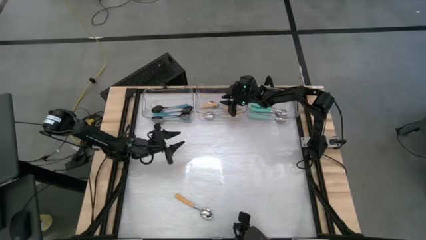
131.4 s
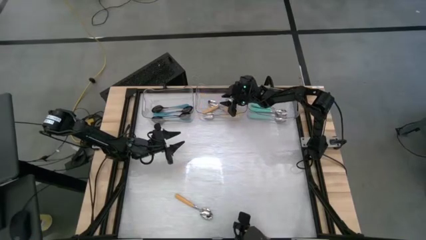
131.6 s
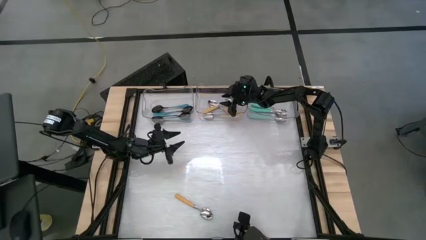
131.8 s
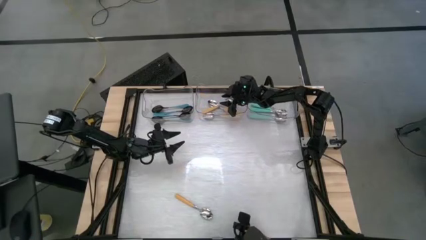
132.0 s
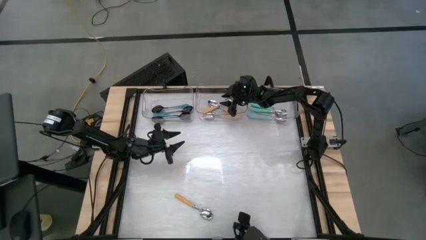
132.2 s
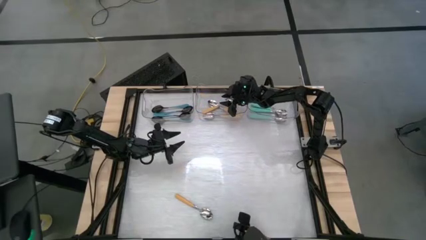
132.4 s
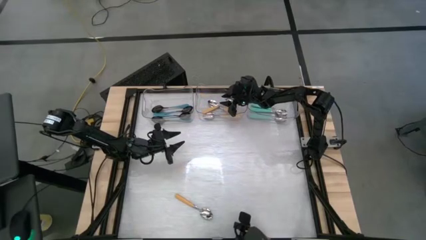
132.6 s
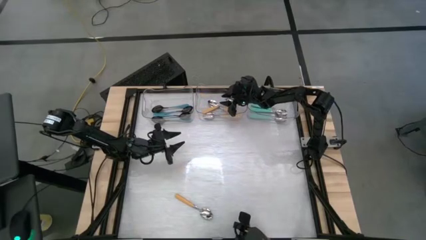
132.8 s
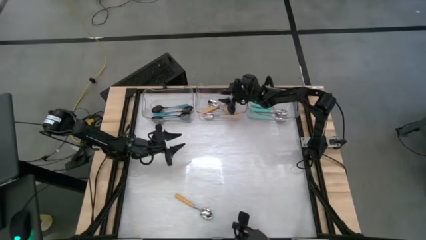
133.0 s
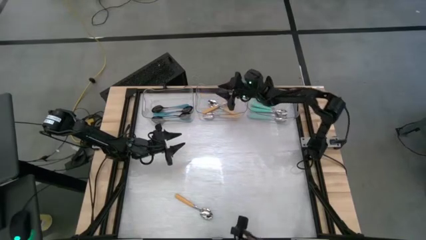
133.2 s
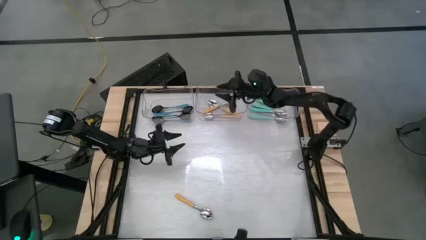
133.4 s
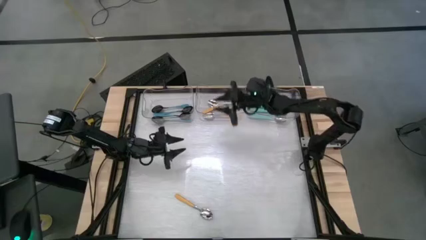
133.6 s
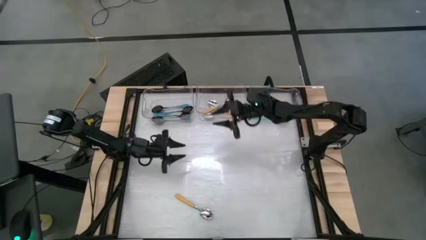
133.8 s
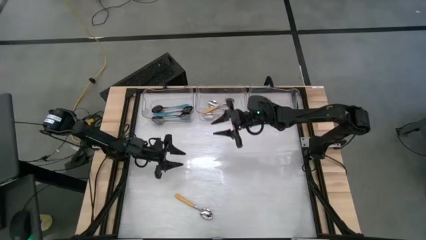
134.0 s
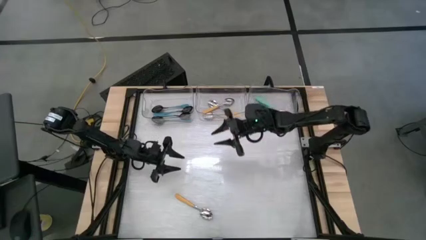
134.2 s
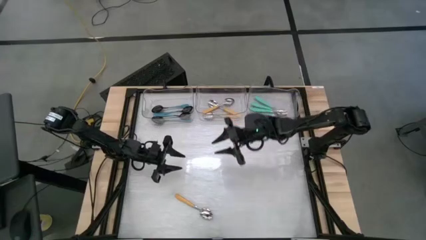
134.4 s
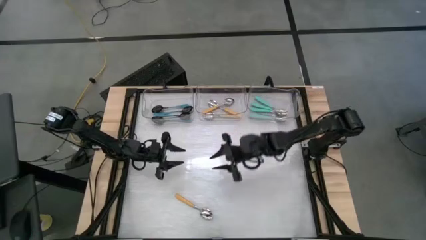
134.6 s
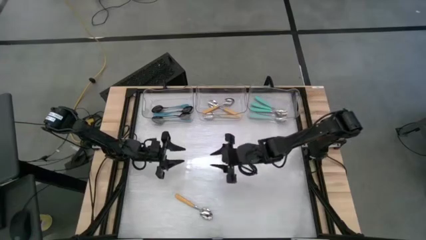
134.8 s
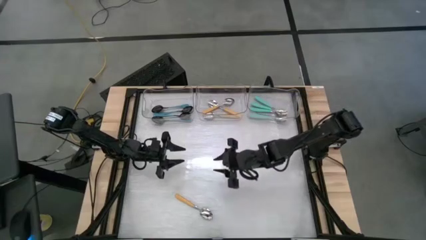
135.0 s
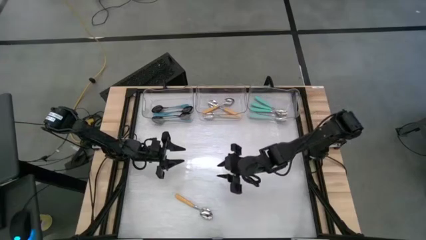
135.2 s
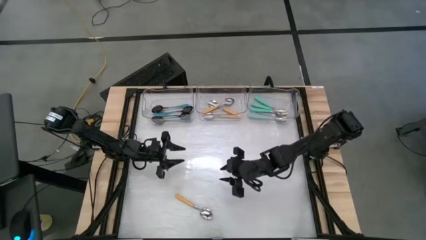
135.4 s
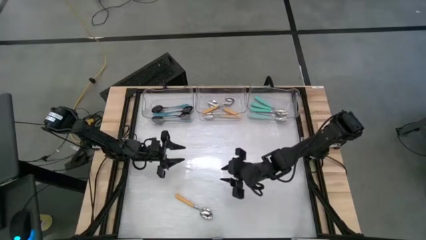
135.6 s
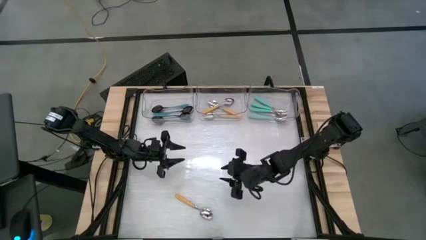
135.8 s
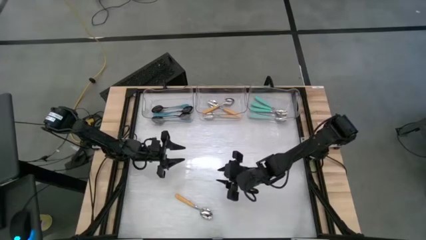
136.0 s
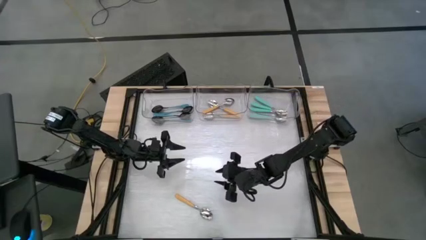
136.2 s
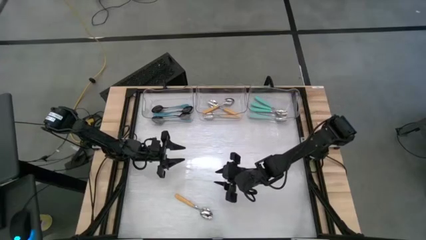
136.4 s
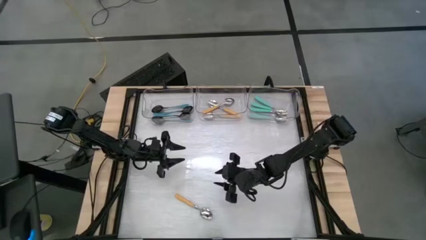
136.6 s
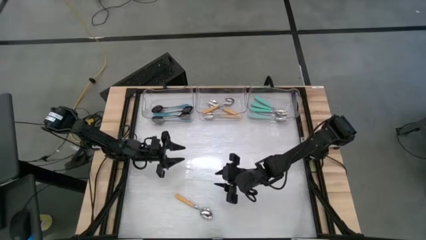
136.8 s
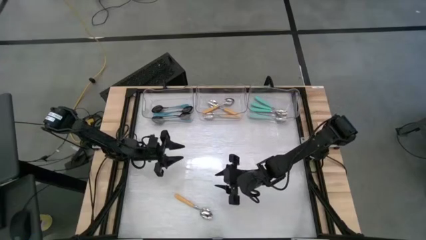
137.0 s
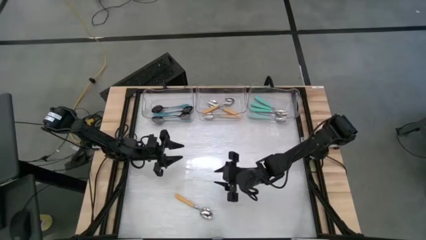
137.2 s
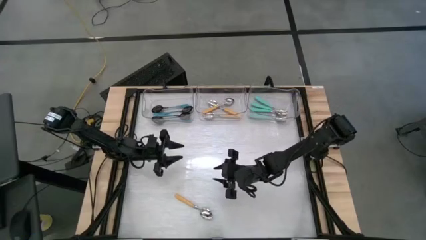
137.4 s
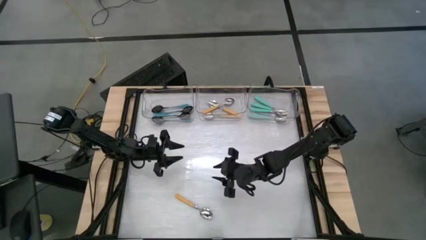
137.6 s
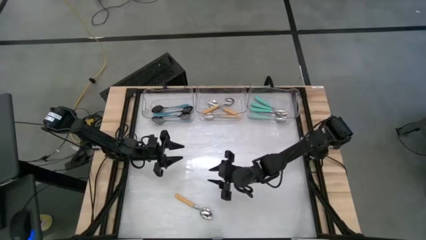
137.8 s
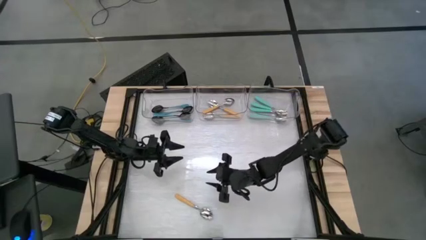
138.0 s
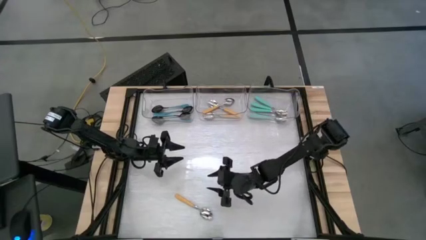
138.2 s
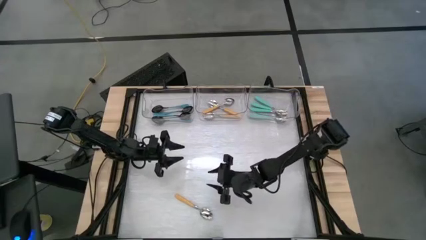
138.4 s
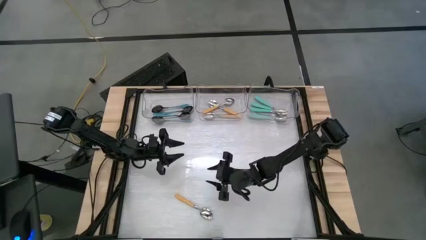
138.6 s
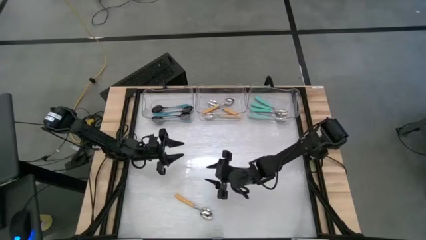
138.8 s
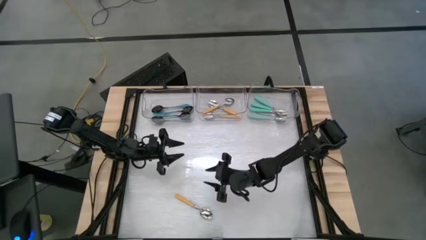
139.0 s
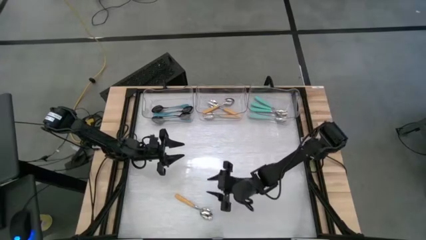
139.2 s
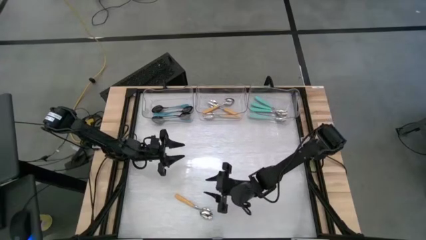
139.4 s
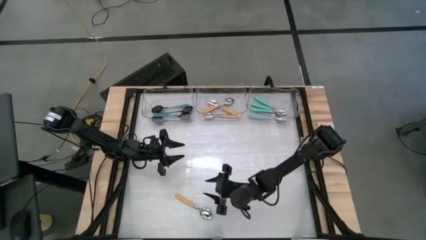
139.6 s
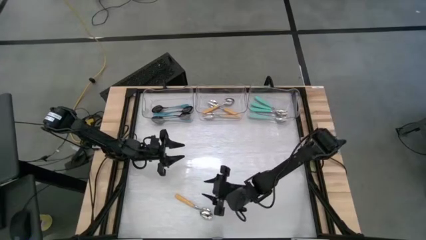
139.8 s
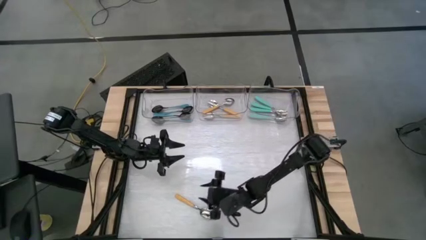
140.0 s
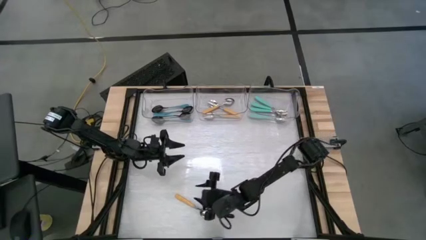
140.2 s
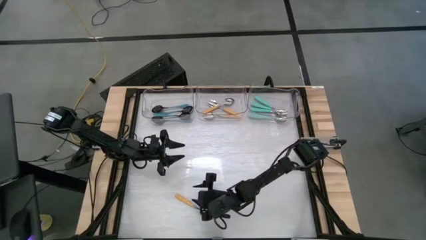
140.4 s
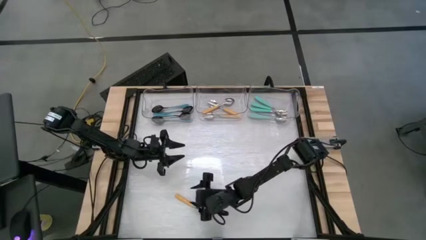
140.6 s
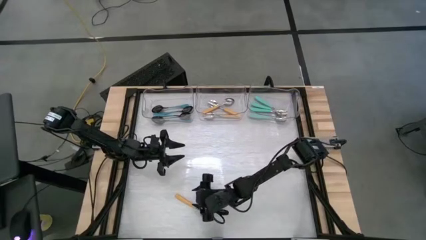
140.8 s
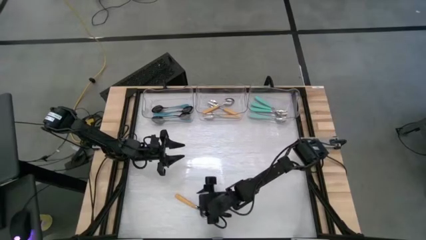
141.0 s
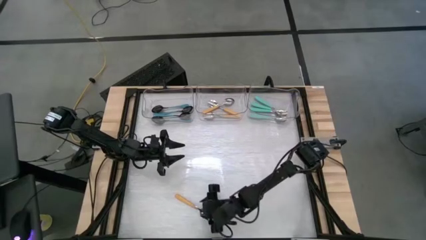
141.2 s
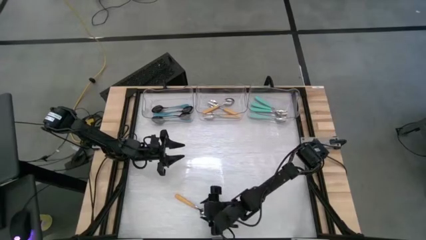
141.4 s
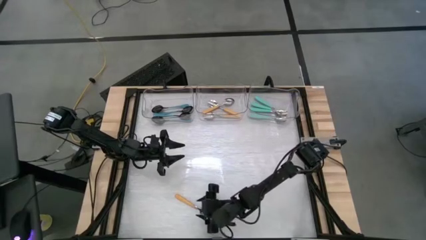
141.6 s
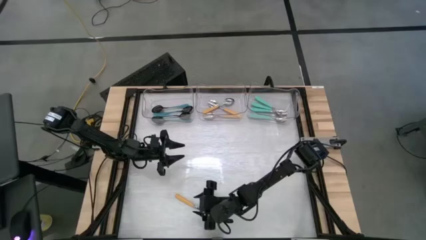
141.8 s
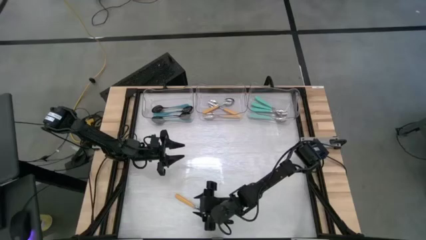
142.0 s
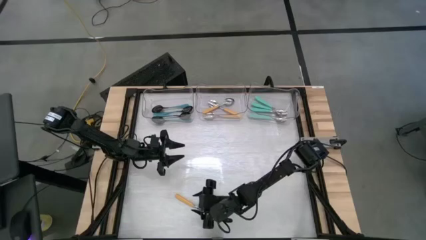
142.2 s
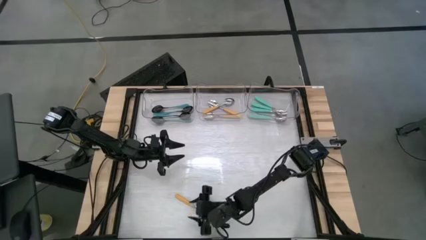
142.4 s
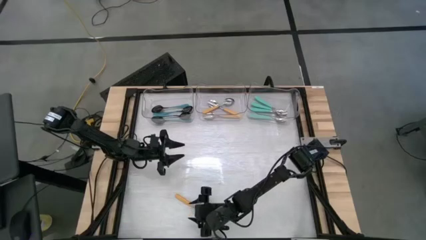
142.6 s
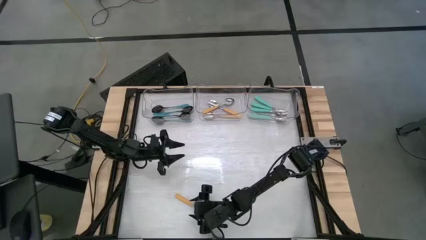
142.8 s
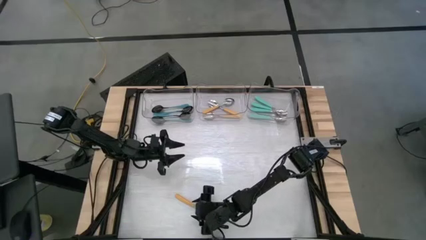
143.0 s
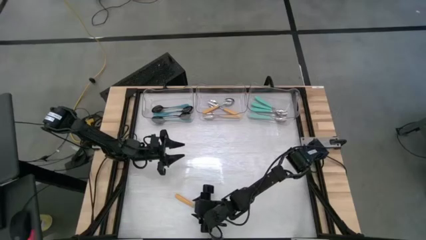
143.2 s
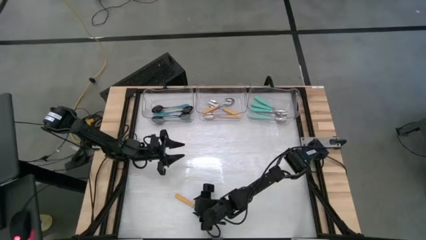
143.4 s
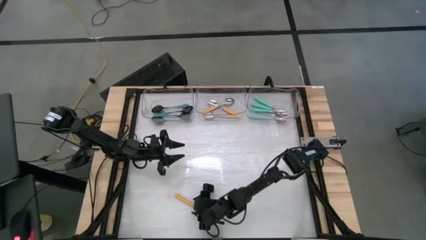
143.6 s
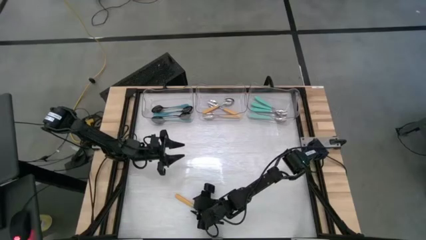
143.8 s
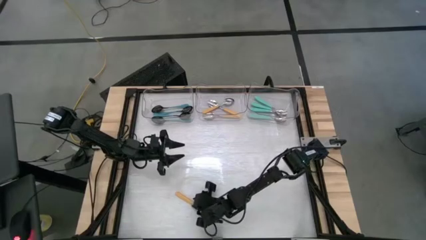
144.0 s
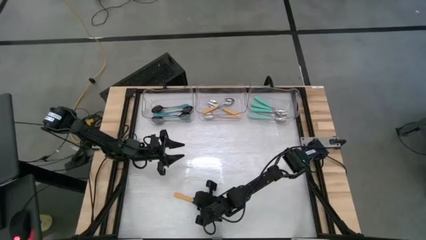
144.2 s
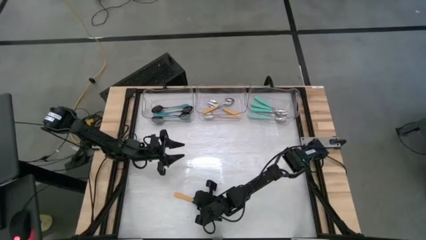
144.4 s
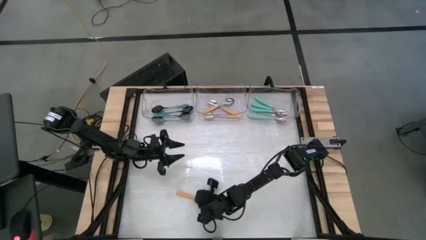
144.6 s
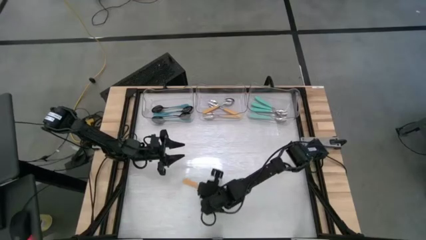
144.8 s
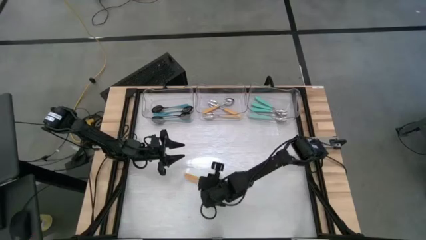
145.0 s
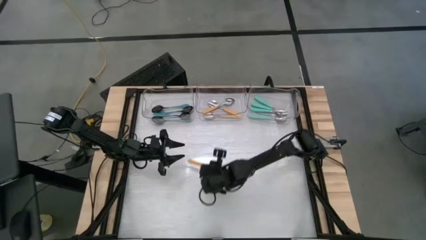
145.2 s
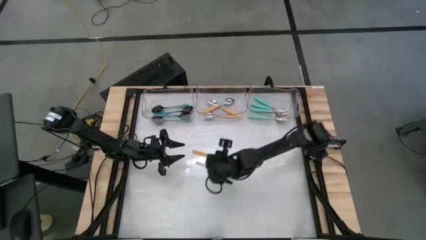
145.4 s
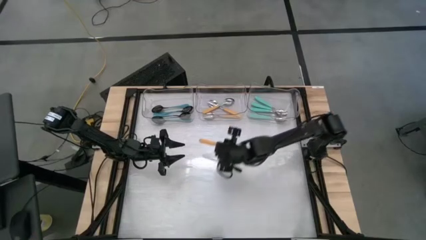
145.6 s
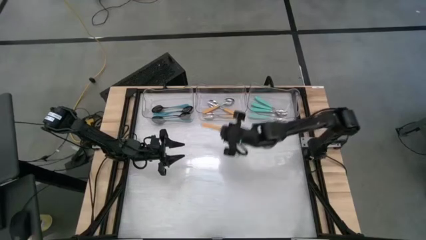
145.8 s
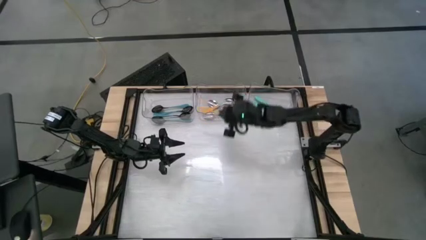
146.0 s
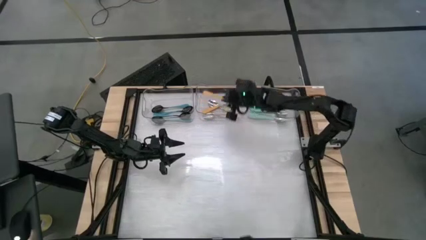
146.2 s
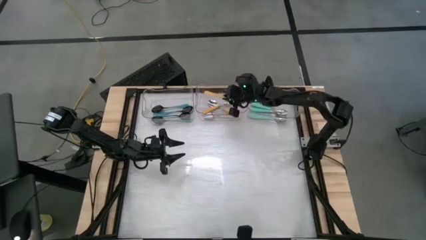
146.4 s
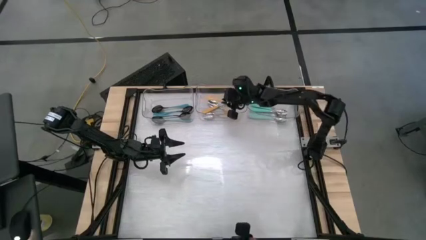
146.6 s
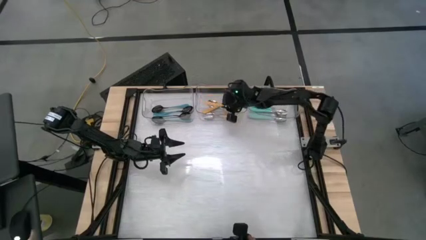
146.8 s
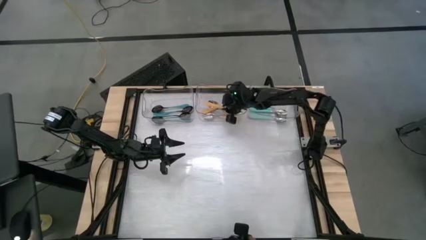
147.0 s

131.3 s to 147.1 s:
Task: Sort silverware by color (type)
Put the yellow spoon into the top center transparent bin

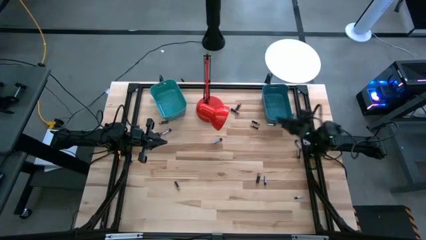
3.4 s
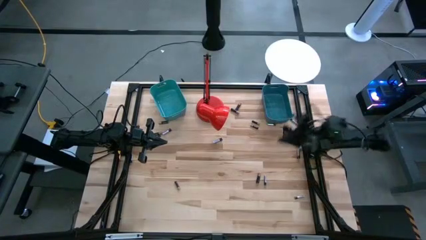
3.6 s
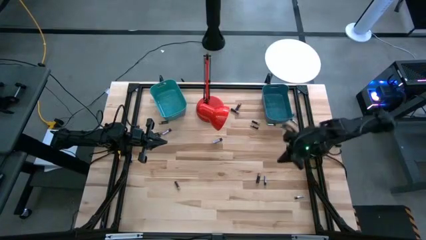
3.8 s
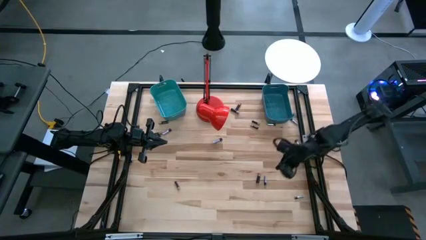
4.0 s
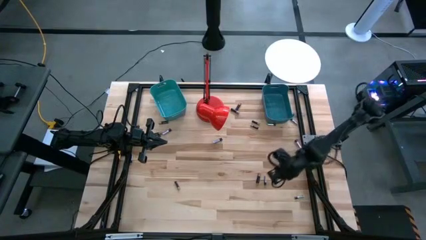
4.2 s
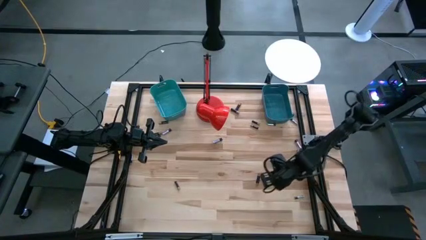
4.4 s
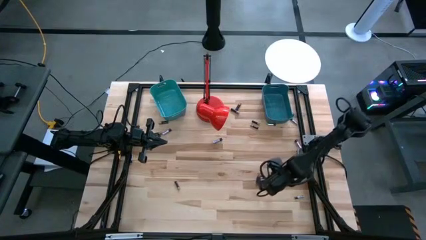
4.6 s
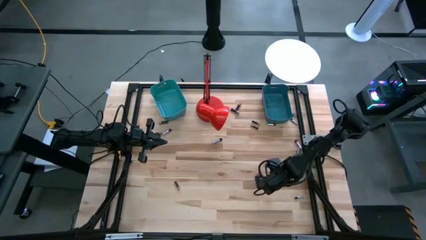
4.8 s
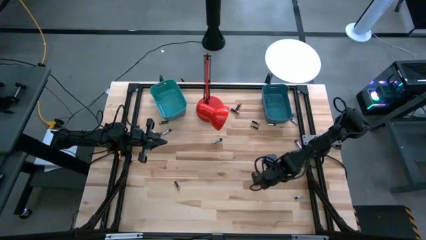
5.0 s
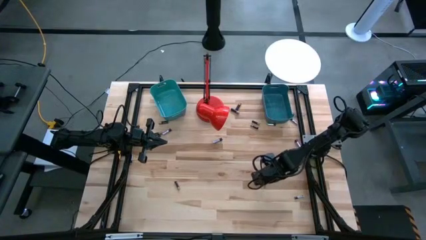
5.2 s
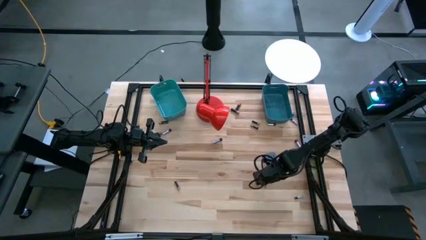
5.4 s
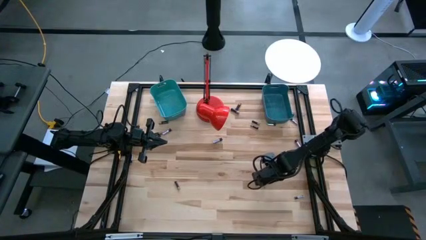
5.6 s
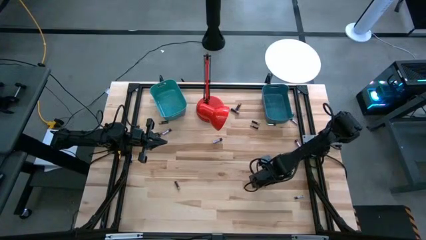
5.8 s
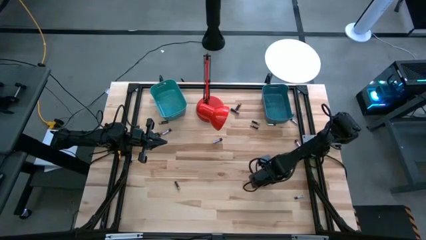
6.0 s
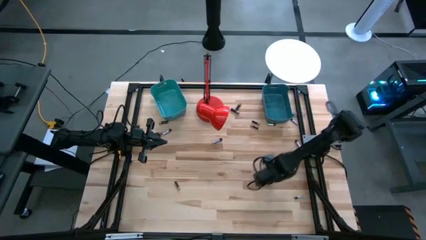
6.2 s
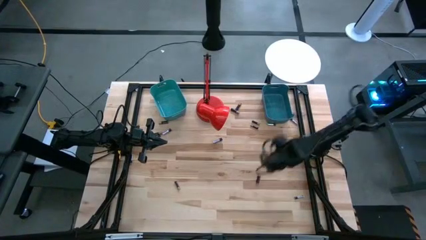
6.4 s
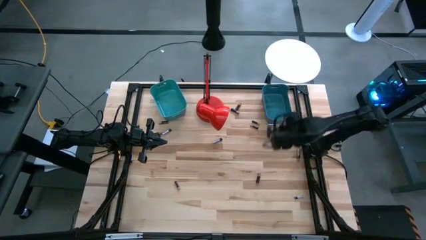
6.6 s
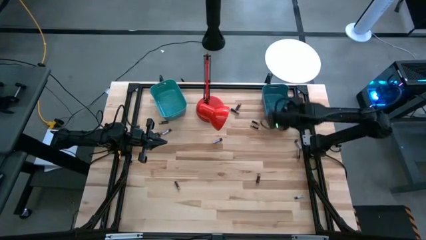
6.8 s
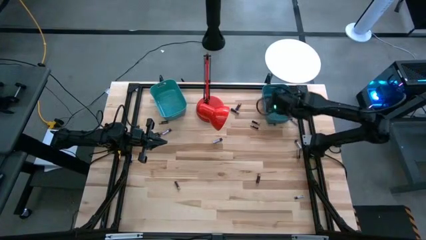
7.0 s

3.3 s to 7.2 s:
Task: Sort batteries
Put the silver battery into the blue bin
